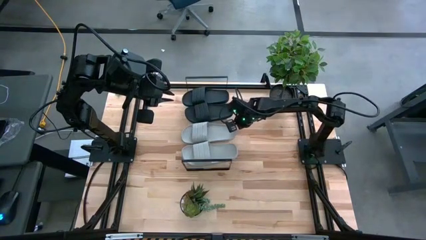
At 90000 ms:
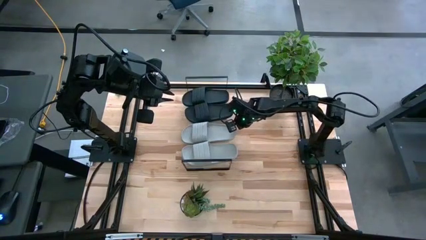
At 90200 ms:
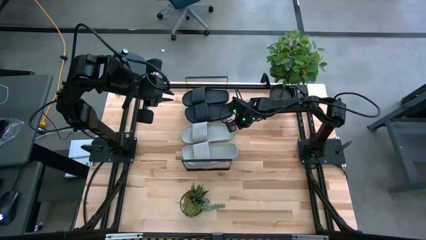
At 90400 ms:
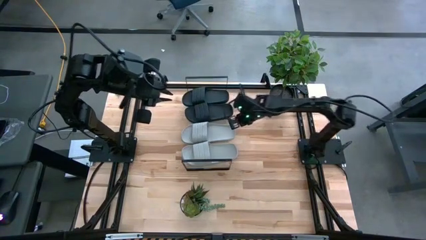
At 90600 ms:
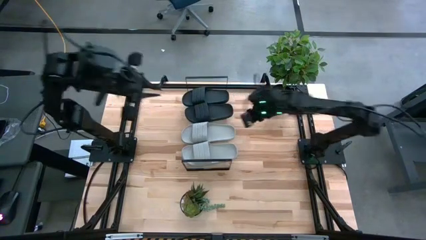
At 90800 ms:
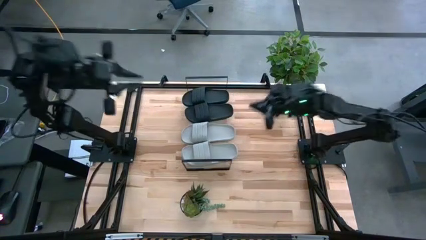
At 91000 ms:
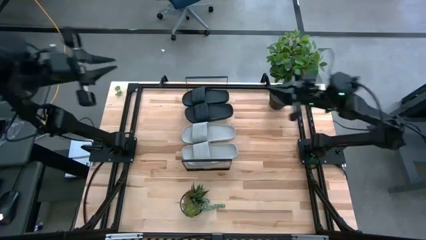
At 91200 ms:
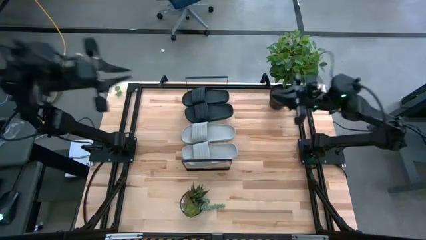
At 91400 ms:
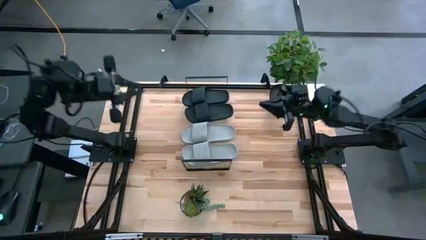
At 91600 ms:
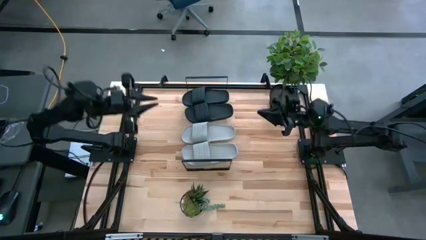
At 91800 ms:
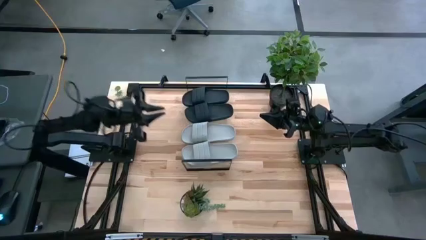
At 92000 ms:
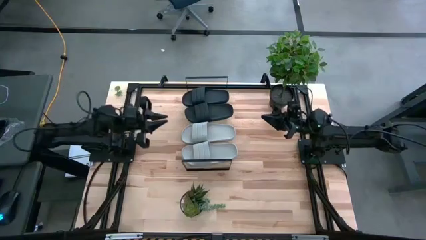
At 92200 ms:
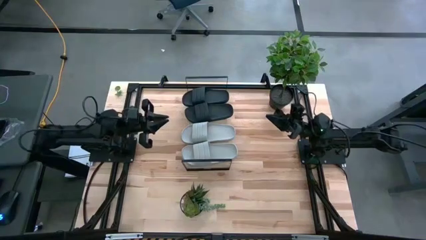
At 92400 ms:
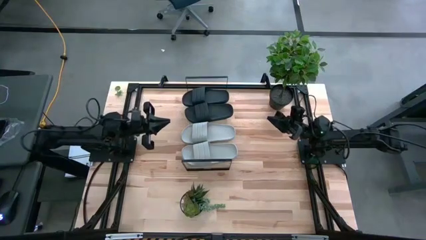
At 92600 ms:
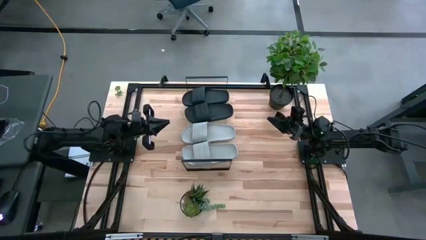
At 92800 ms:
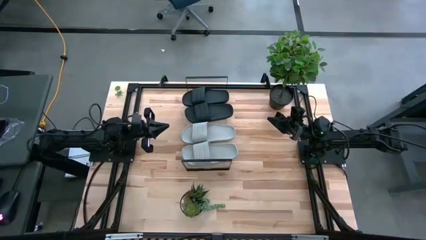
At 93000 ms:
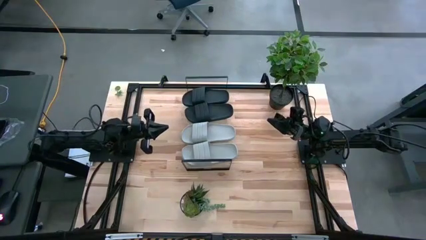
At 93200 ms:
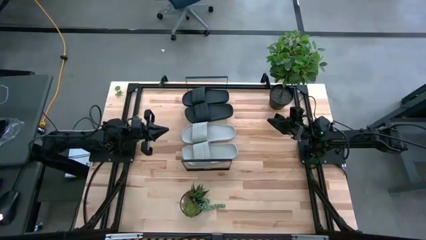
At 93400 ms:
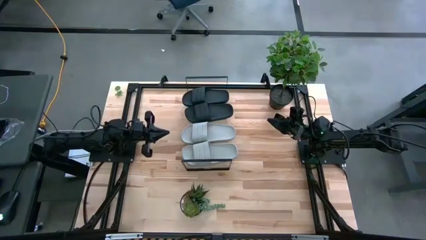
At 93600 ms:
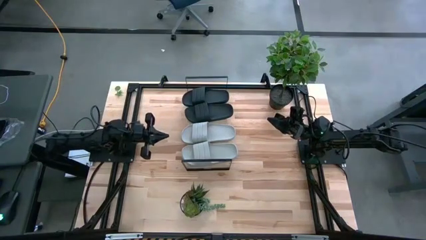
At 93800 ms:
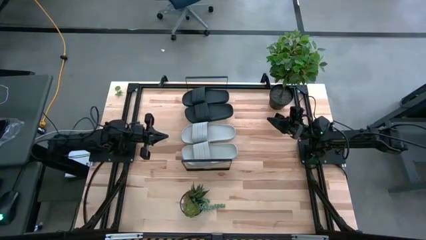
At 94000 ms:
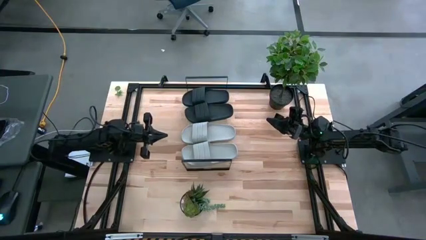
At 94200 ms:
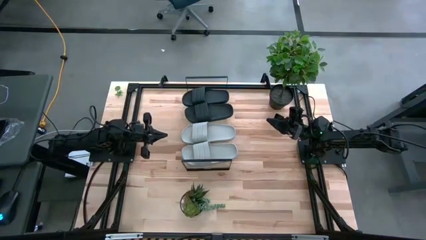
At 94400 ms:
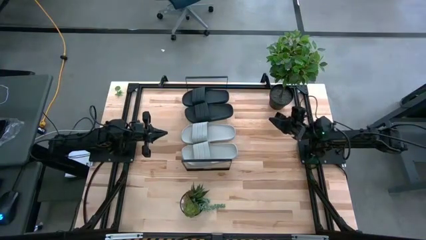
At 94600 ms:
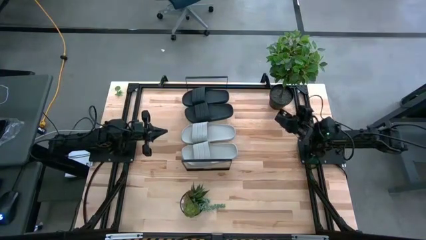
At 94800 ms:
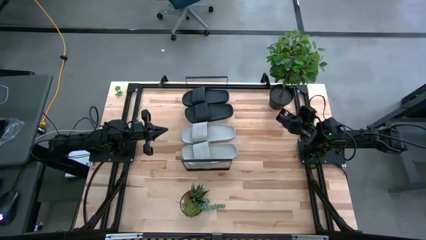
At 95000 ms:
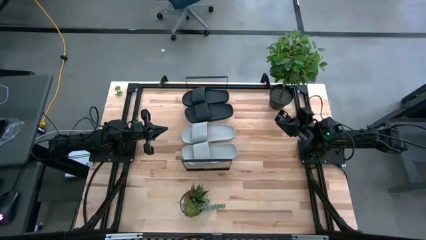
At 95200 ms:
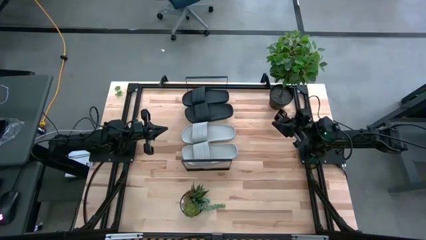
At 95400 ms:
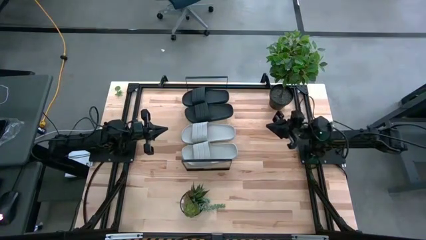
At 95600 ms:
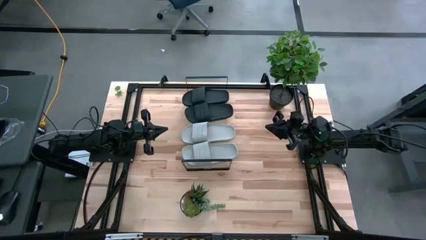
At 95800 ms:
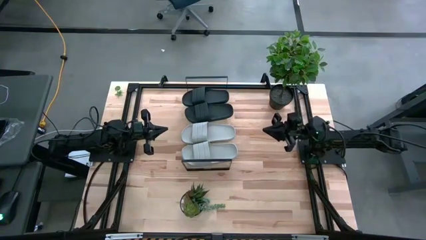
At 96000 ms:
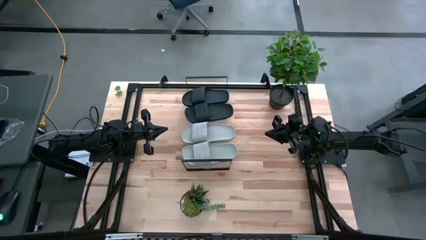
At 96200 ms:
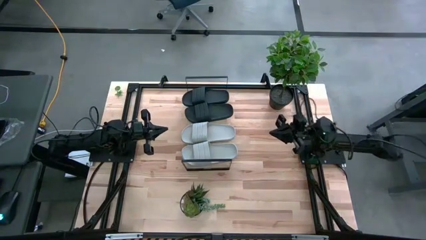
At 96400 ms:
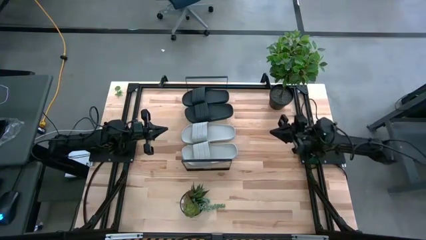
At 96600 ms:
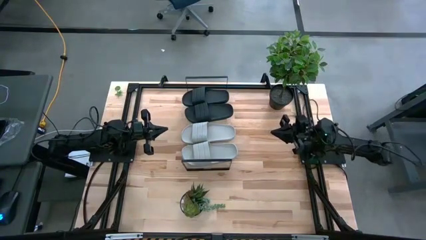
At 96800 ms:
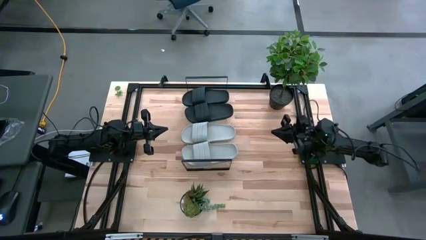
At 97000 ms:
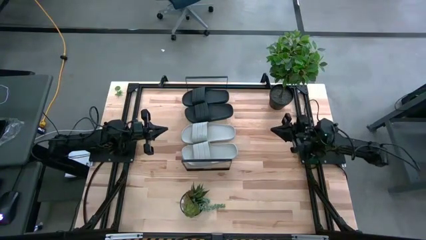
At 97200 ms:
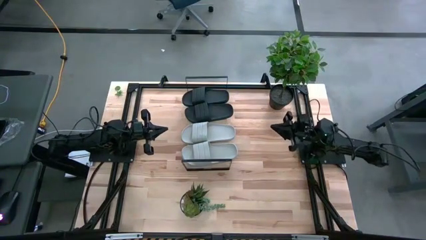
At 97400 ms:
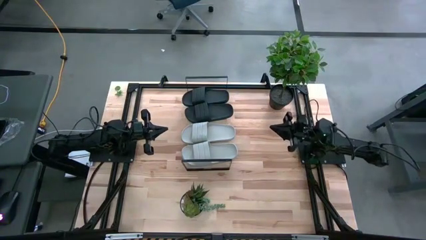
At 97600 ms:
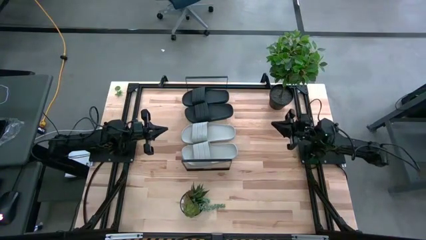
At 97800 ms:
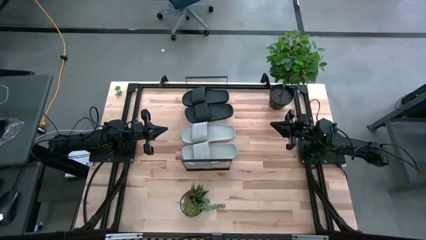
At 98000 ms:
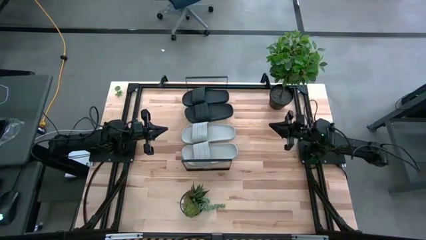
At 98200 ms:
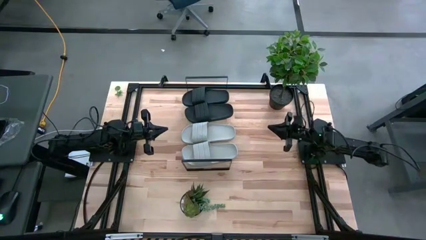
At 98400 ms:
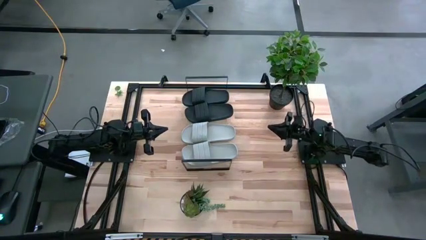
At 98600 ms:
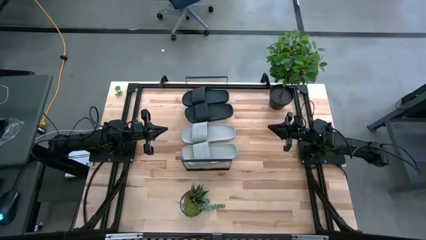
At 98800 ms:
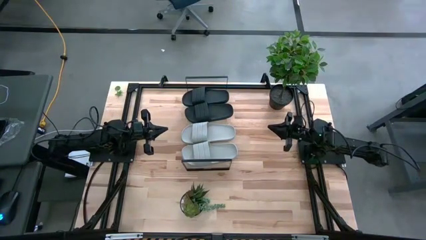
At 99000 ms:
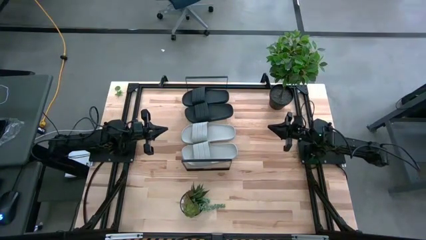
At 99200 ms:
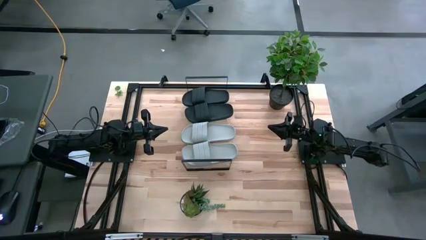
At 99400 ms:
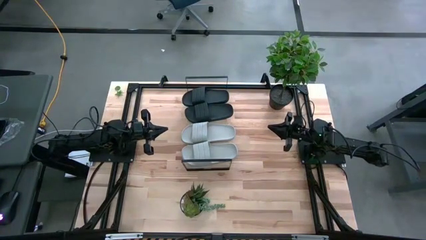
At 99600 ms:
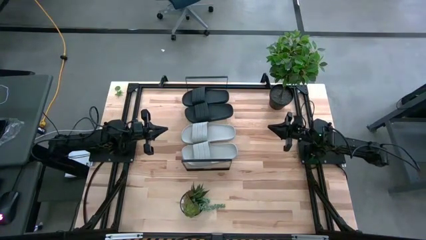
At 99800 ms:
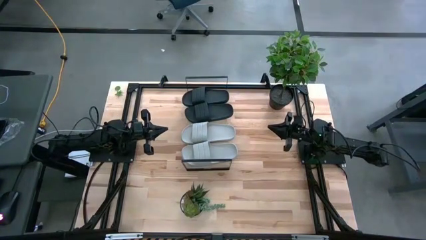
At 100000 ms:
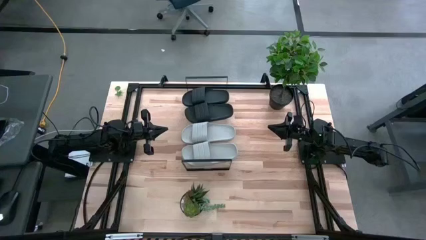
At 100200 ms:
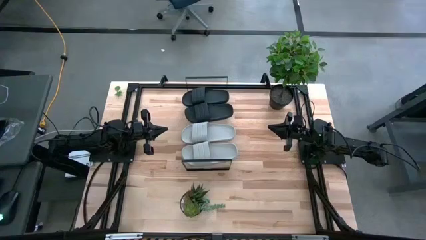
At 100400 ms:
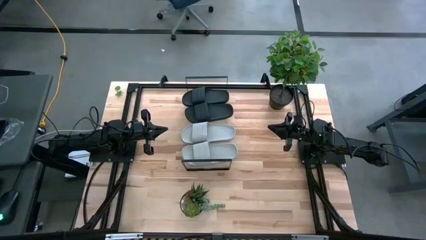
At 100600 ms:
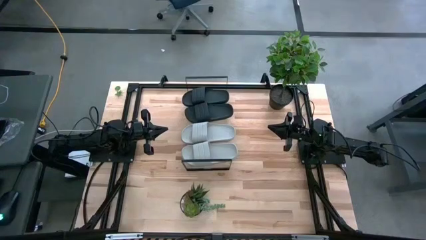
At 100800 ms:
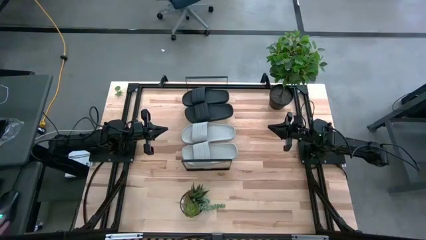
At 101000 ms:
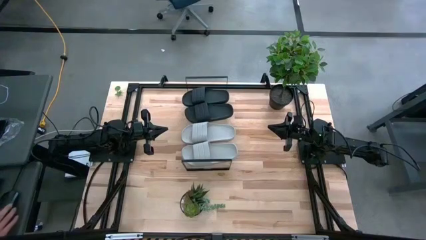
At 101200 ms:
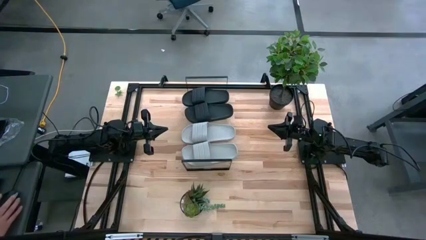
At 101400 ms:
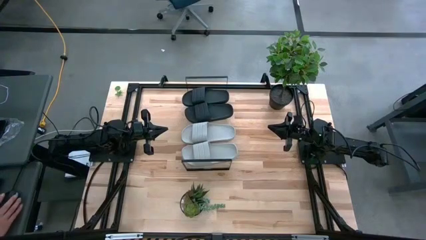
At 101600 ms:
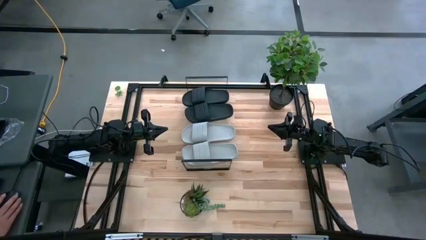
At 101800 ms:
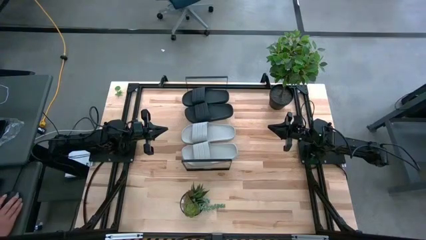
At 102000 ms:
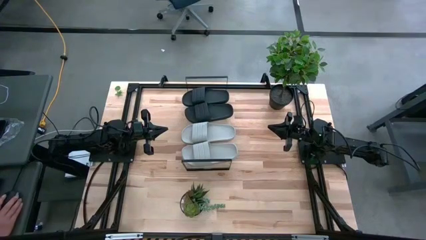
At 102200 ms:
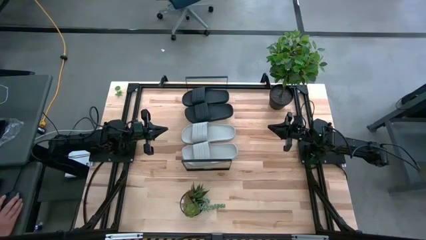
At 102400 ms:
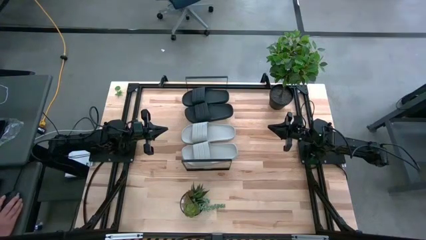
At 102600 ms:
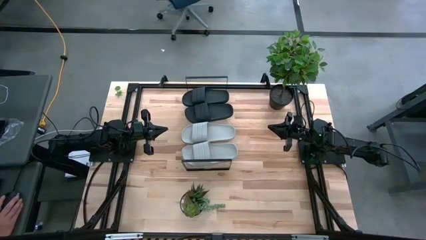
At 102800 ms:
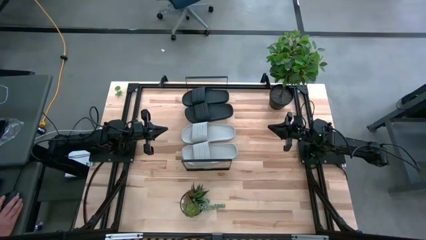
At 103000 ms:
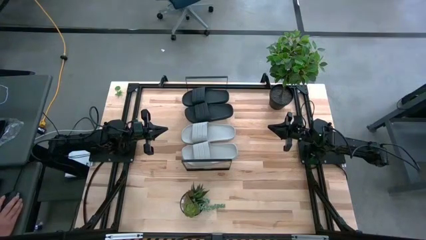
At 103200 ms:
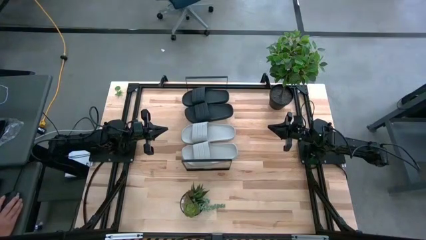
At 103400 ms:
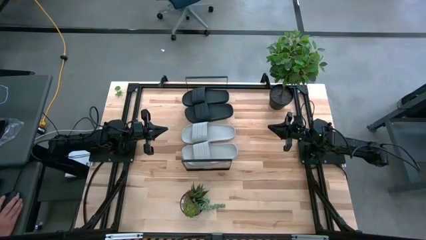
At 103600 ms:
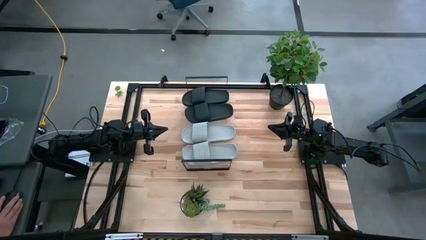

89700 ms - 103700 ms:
Task: Pick and place slides into the shelf
Return to Home Position
